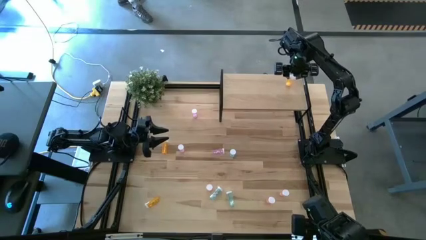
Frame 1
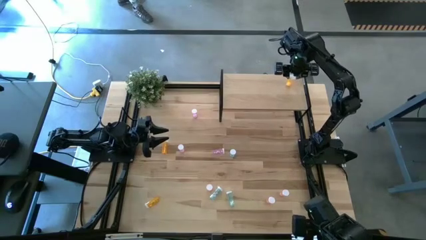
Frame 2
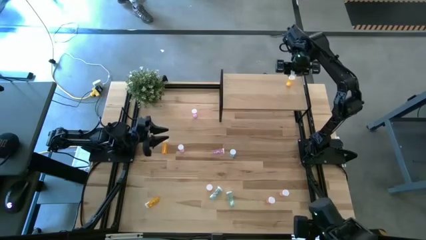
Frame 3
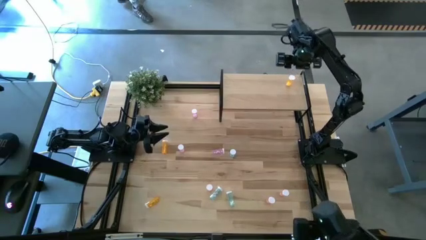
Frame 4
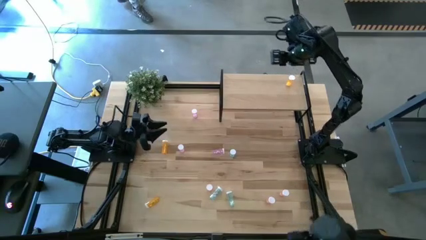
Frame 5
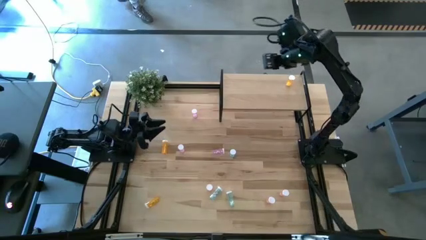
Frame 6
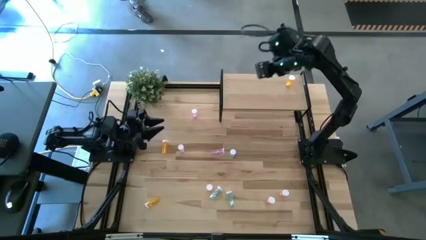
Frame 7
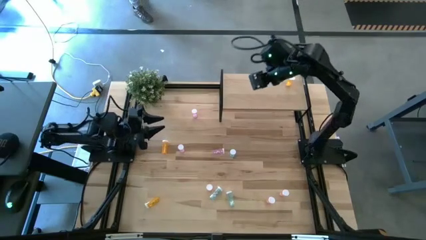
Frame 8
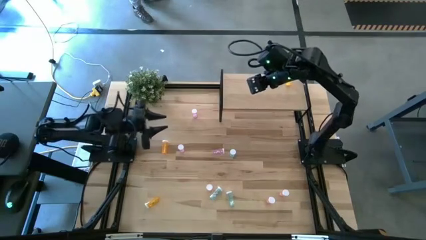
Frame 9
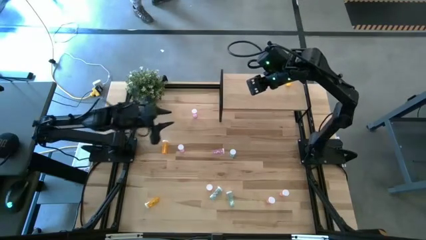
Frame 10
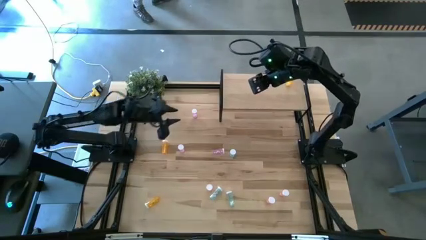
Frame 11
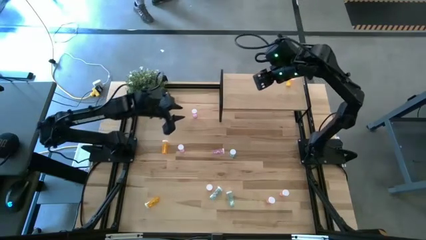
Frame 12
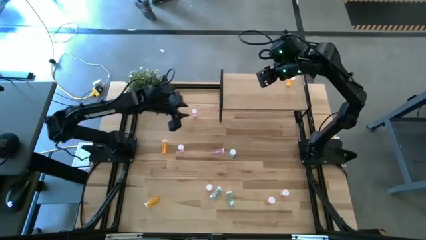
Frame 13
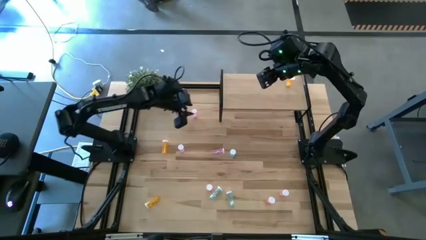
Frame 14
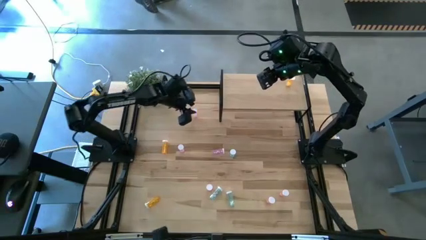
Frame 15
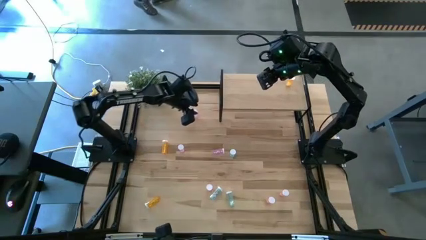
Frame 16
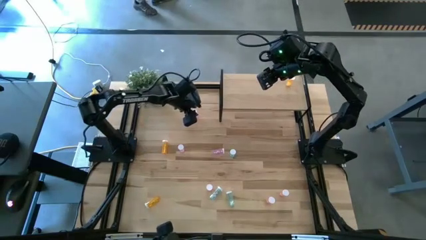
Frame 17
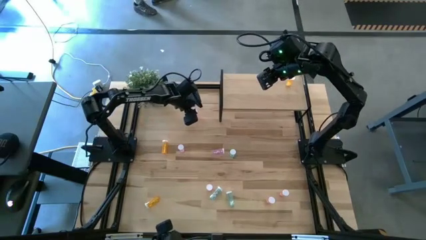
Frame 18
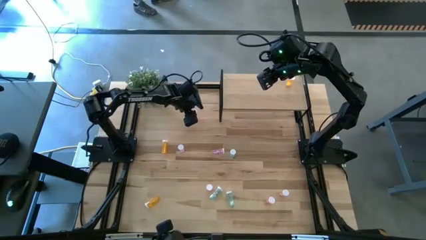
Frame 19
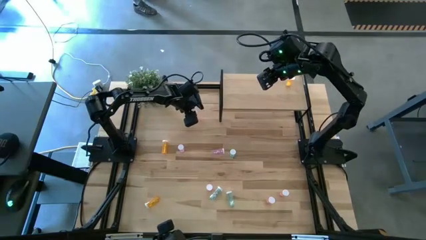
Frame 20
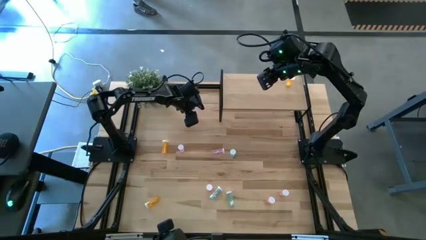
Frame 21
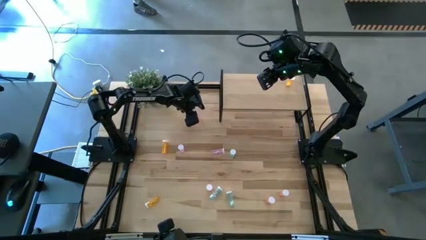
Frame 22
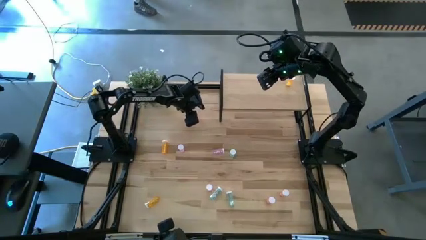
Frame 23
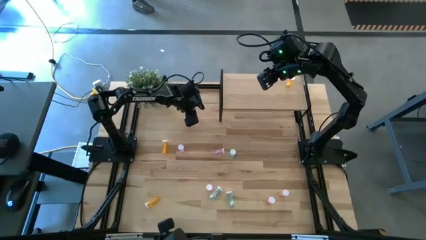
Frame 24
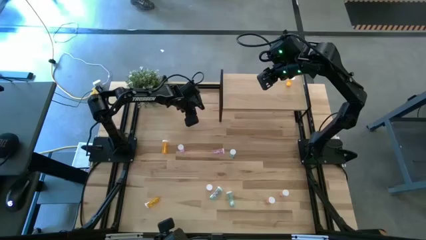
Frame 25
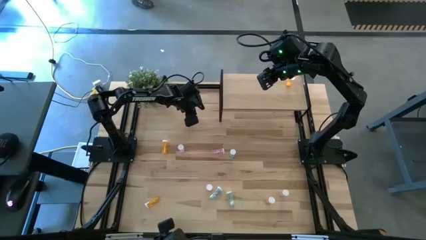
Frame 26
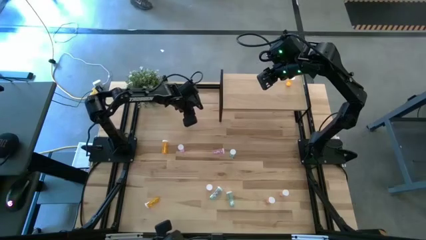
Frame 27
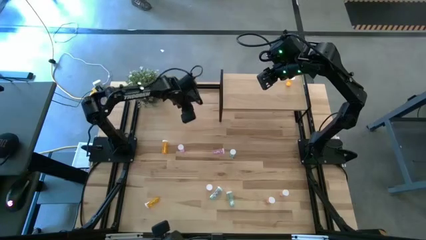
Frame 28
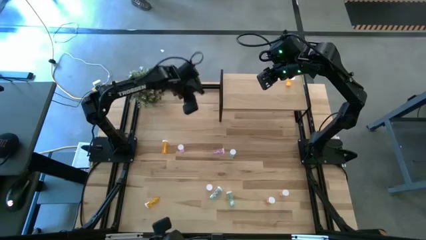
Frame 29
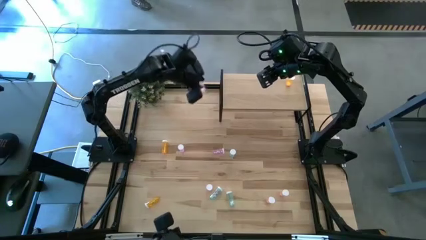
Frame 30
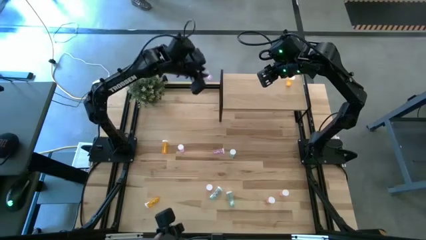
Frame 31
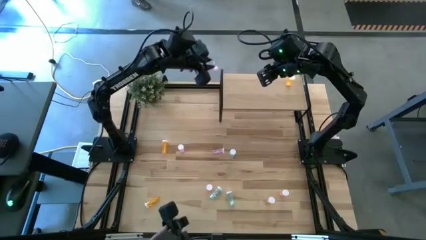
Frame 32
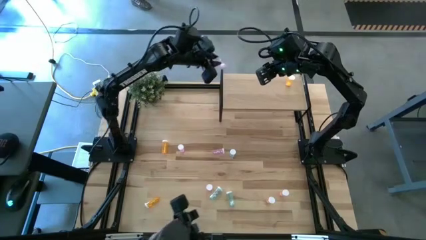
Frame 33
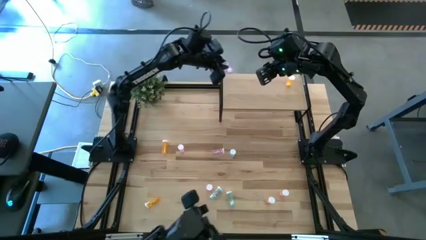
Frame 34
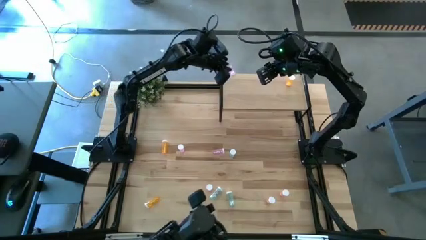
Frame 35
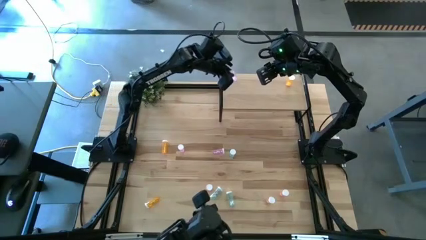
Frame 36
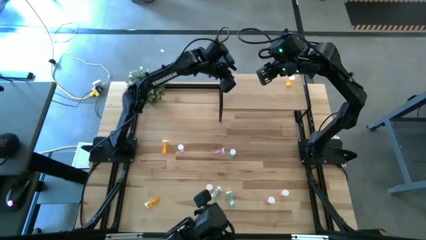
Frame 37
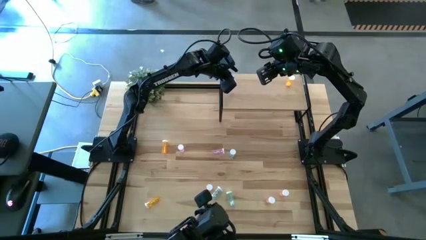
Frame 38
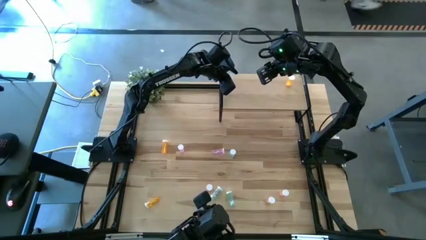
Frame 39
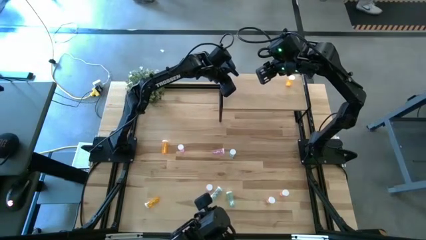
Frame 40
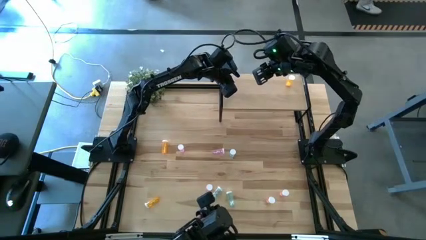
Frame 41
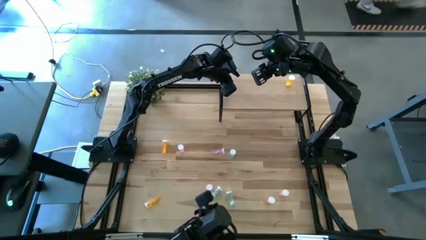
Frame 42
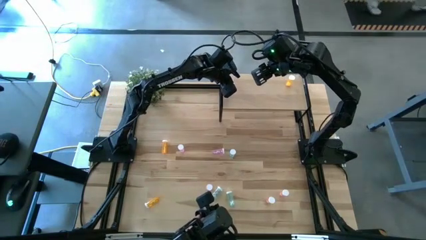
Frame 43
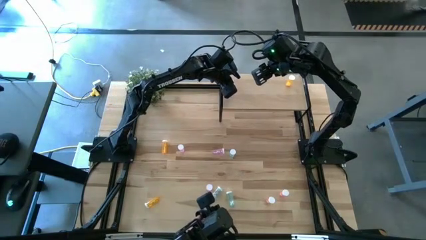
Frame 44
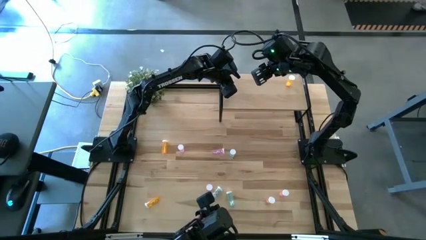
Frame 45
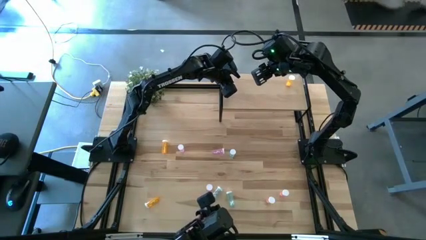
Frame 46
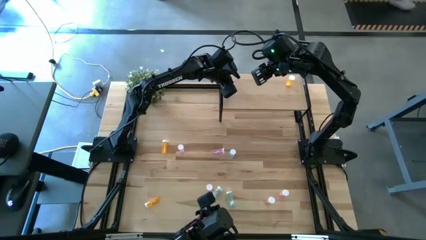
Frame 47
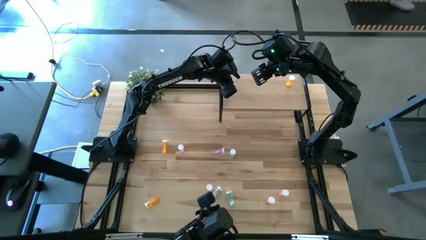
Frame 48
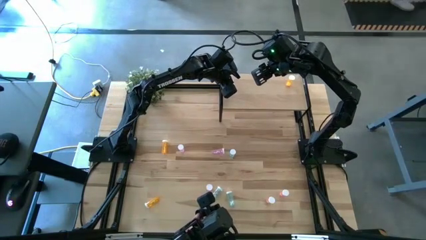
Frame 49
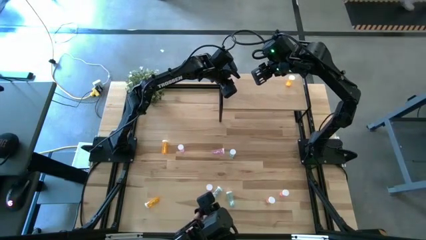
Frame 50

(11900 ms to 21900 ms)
Task: Pick and place medicine bottles onto shelf by color
Put the top pink pill bottle on the shelf
